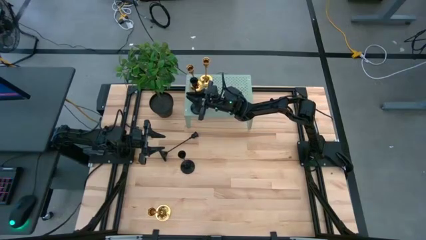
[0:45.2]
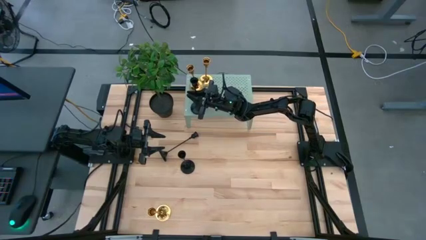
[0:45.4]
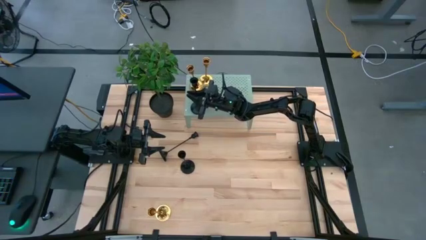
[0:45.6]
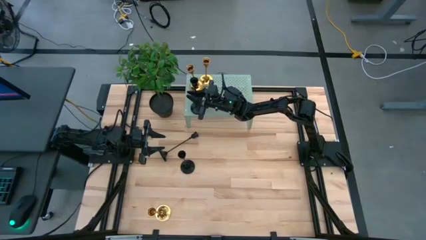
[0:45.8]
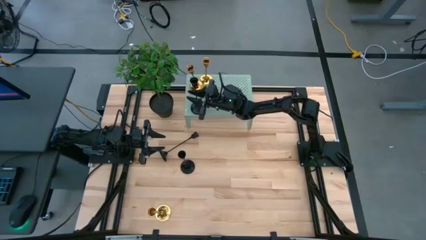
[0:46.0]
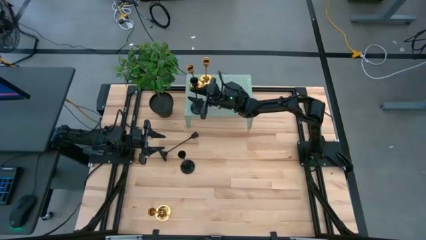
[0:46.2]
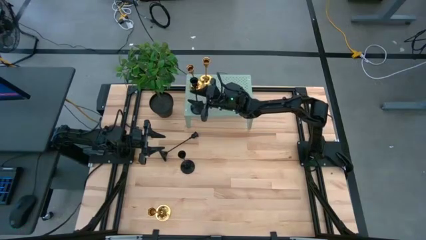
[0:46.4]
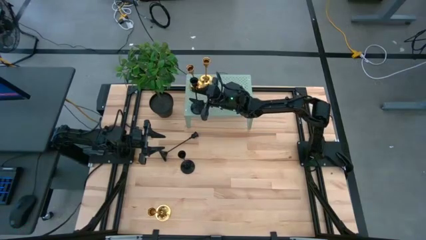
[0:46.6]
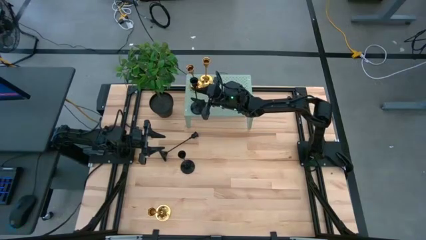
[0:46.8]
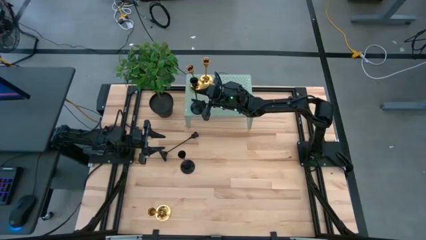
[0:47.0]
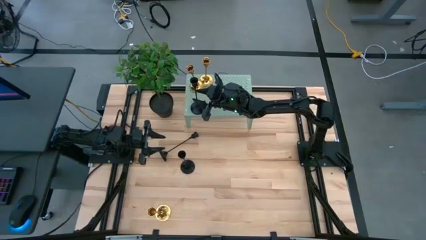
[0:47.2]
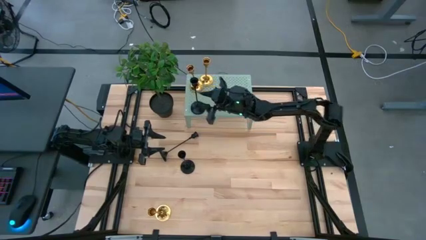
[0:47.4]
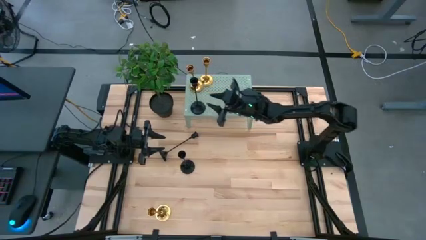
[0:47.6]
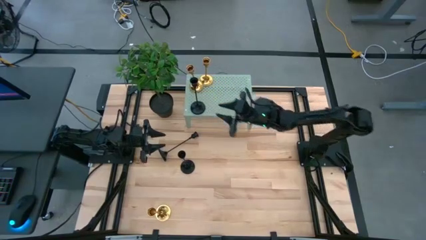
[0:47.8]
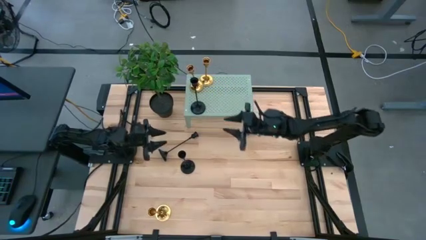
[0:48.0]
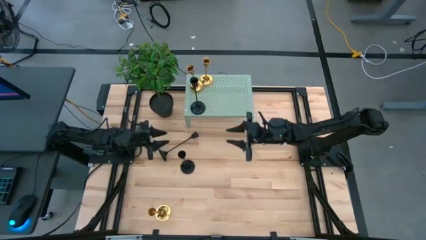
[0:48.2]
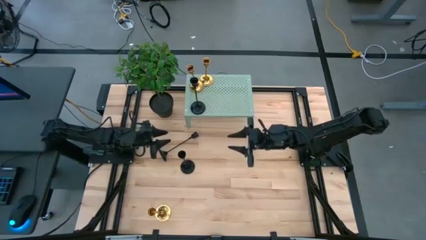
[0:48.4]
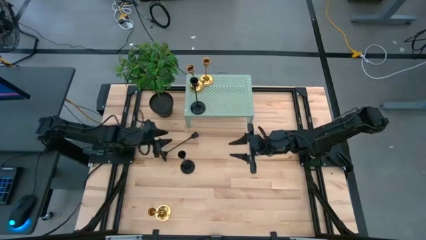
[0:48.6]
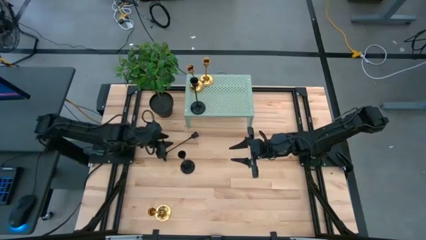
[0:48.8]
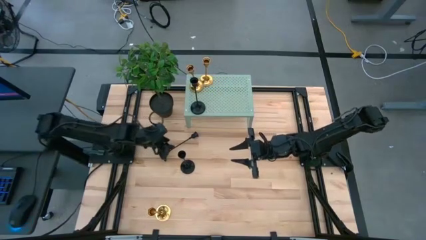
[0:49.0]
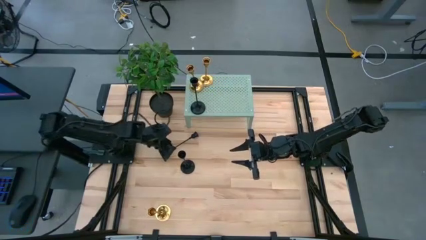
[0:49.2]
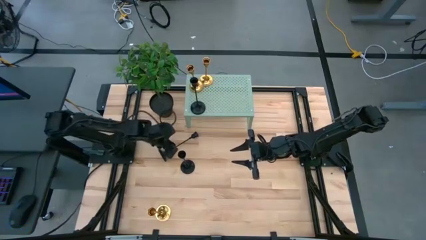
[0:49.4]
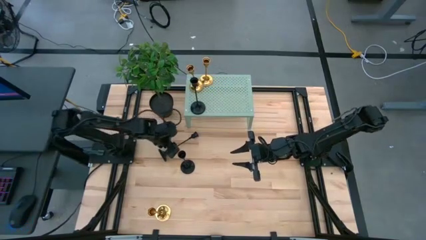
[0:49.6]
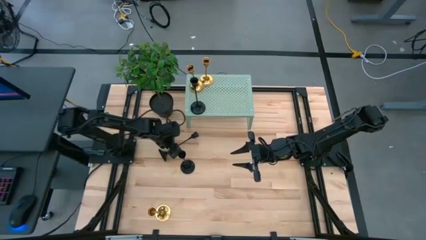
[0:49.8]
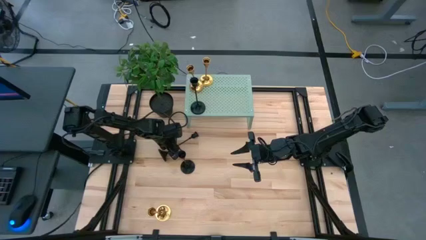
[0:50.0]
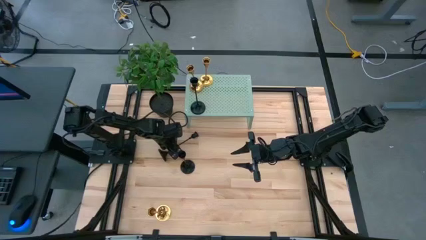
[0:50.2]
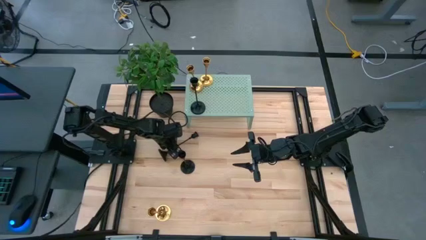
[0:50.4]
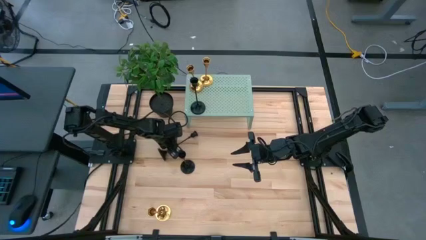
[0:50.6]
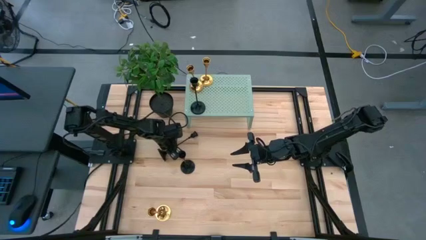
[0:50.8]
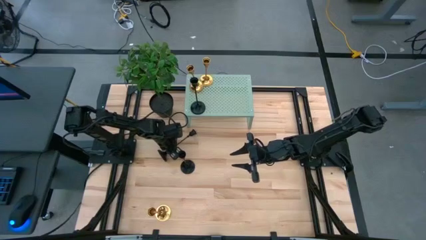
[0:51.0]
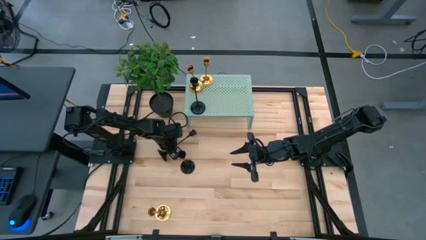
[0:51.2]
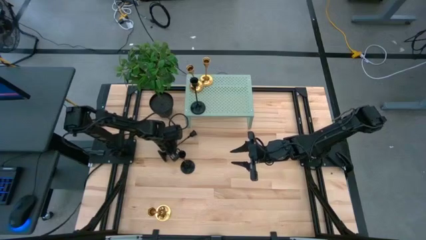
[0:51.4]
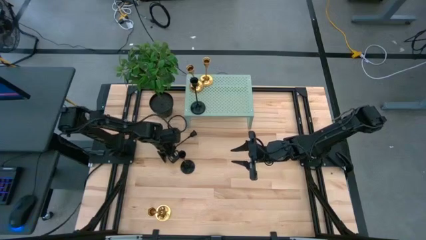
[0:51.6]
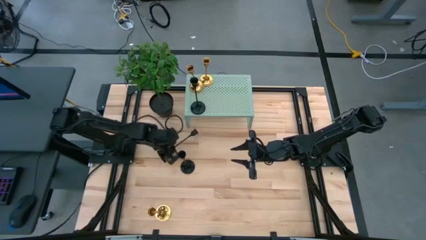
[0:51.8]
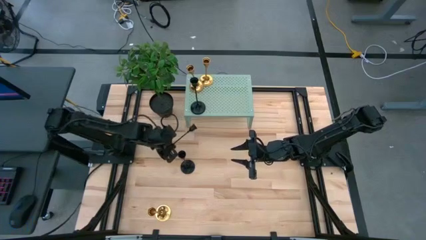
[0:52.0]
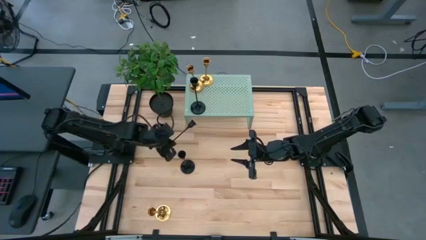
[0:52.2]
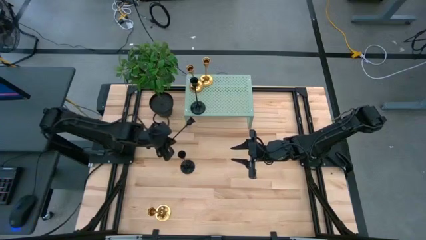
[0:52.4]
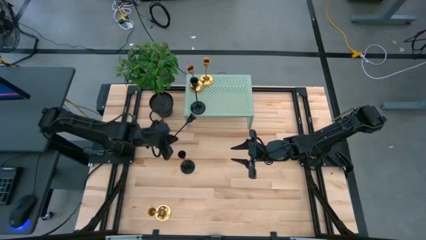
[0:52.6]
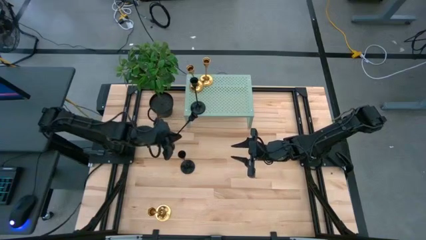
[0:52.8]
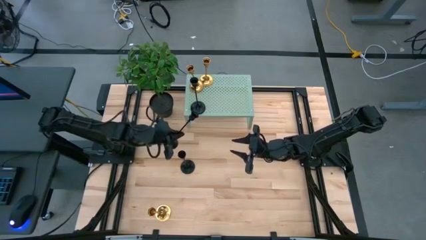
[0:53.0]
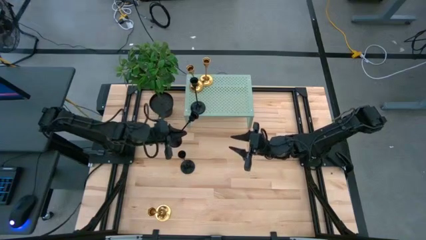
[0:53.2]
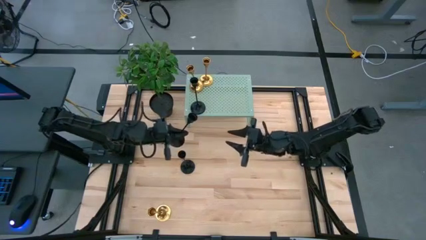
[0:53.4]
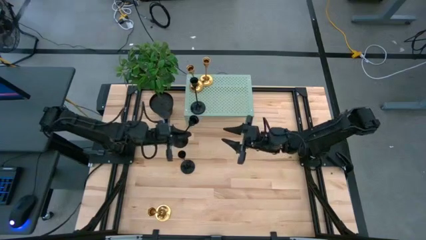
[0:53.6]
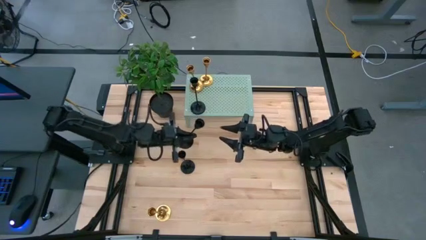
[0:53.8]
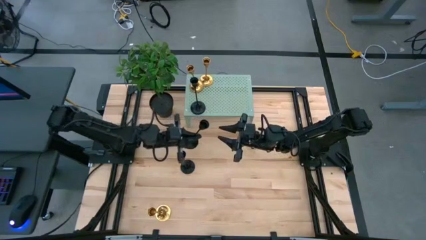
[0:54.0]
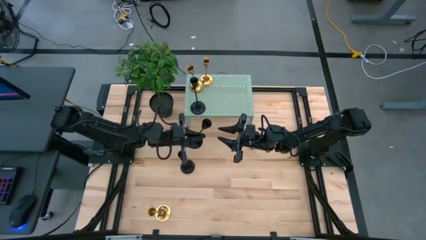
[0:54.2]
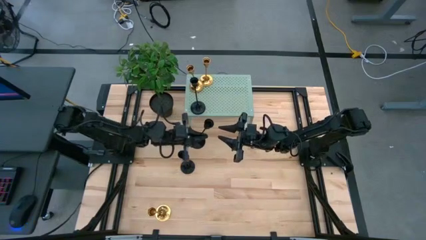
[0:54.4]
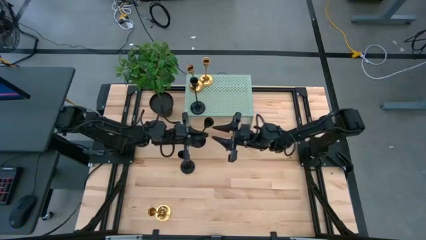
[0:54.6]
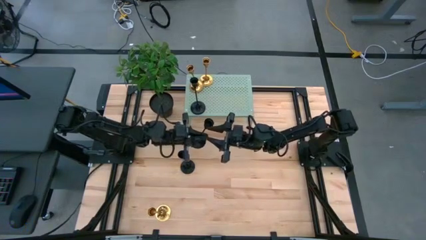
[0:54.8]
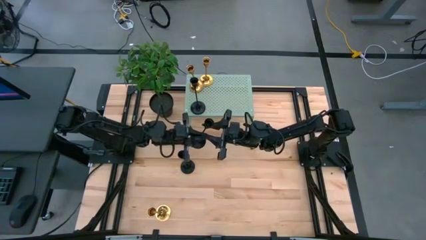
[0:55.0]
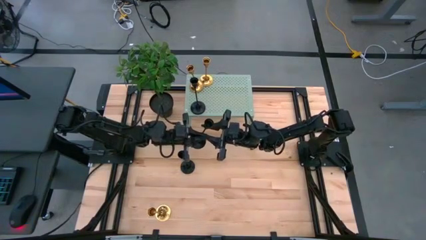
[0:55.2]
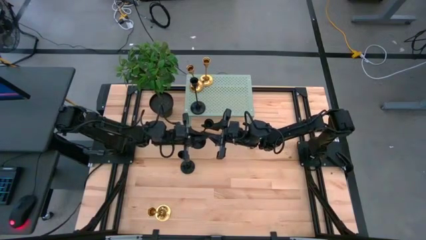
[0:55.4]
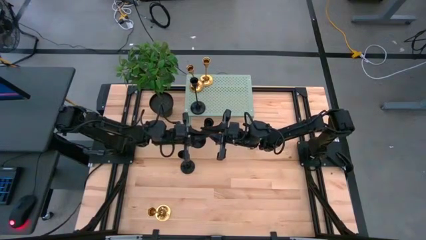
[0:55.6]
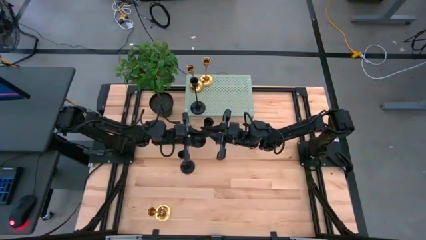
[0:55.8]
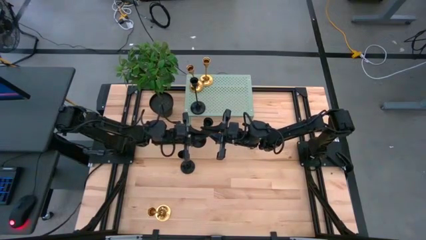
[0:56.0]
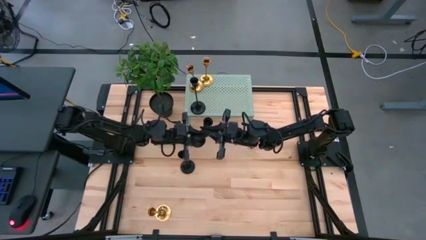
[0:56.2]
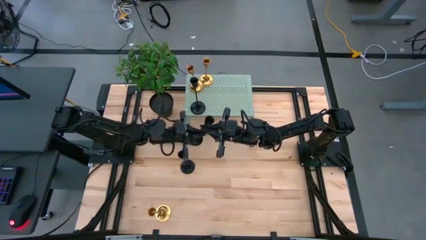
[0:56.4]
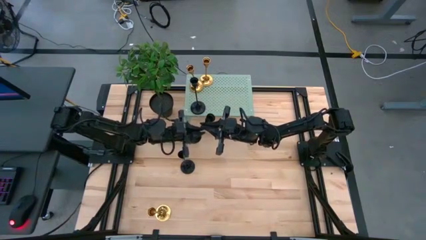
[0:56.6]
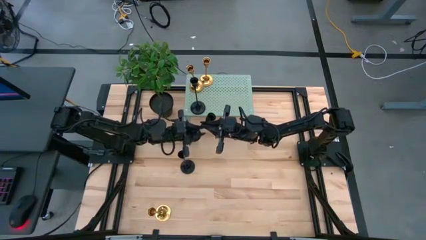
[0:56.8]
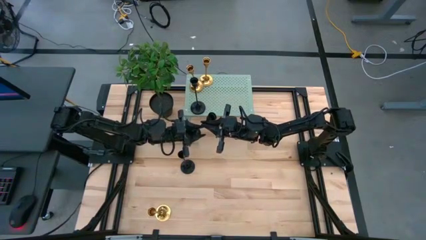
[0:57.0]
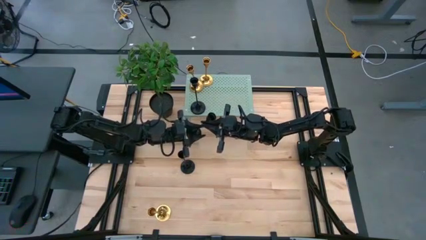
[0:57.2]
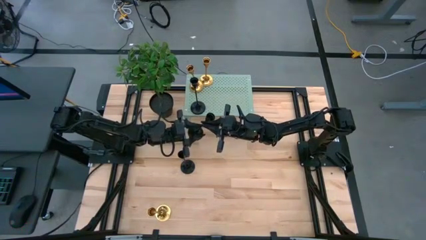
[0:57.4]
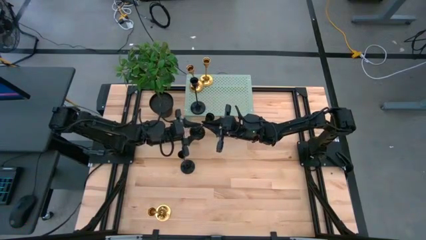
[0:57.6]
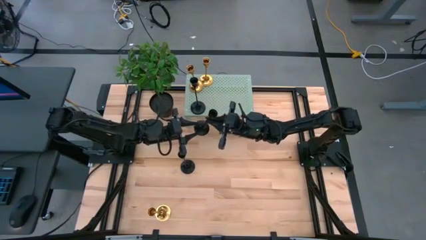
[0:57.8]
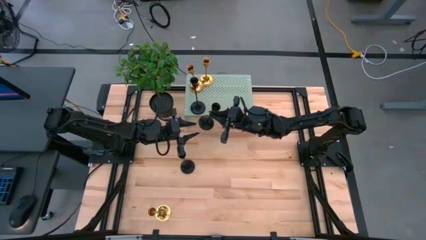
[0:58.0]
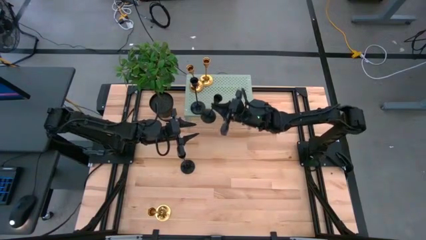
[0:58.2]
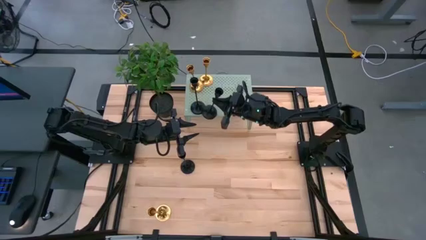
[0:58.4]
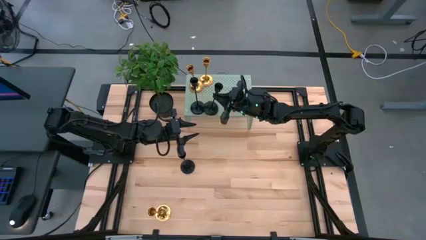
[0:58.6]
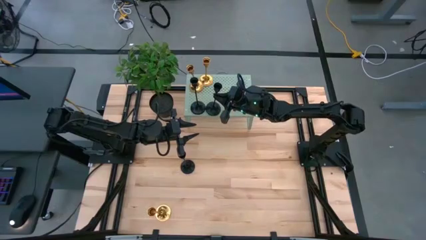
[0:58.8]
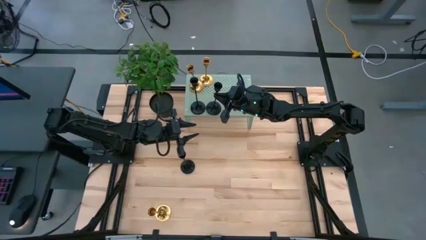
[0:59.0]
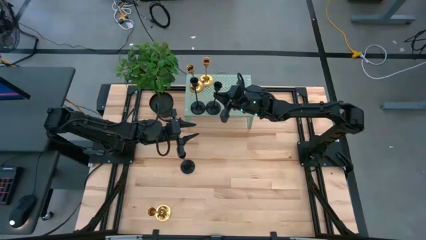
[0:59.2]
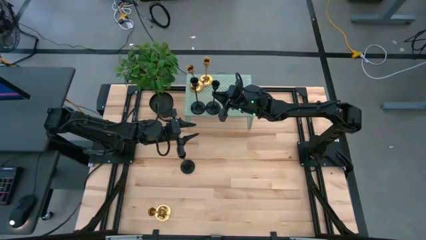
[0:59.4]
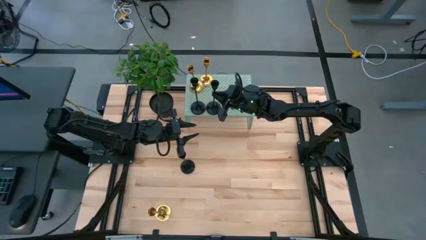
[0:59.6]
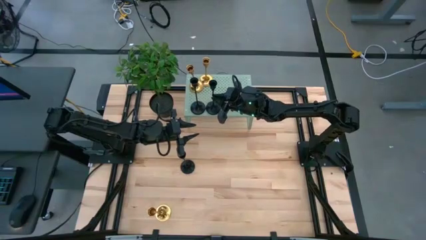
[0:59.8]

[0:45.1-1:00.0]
Task: Pick & Place candle stick holders
Put the top black candle holder on the shelf

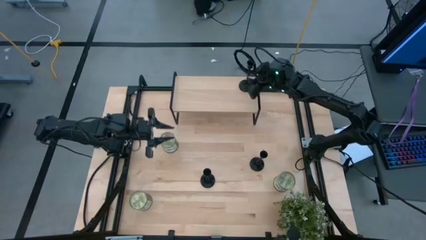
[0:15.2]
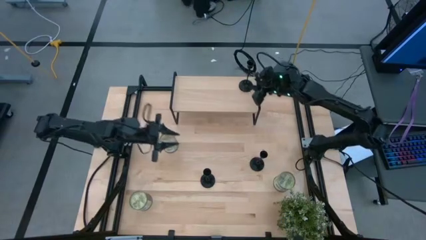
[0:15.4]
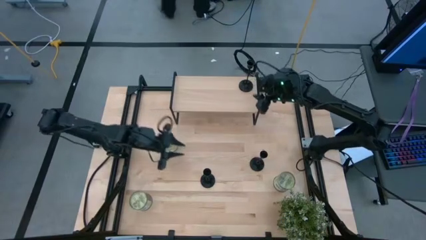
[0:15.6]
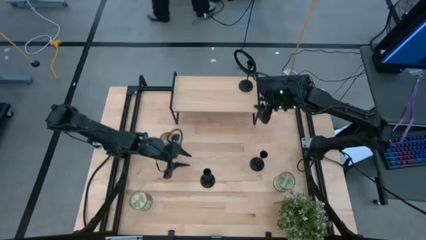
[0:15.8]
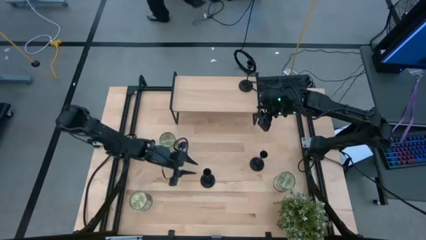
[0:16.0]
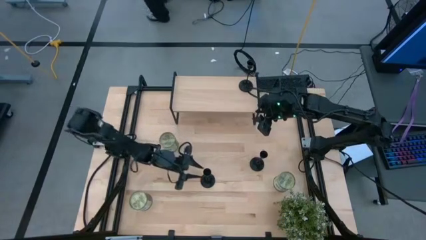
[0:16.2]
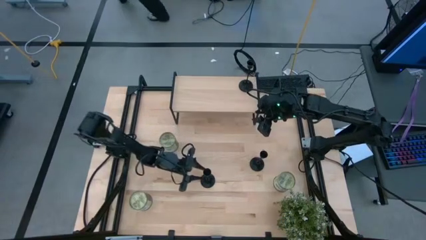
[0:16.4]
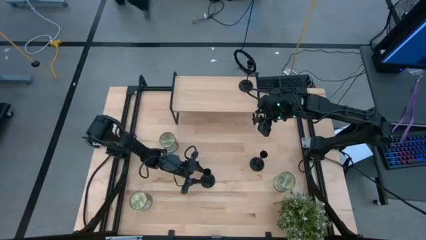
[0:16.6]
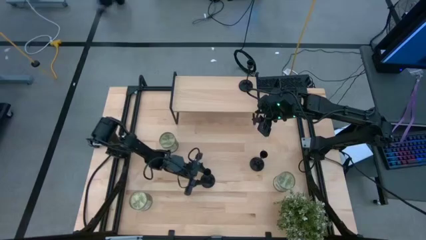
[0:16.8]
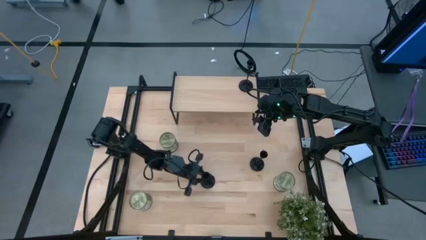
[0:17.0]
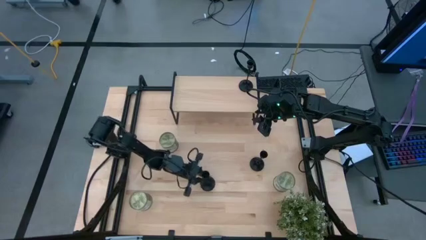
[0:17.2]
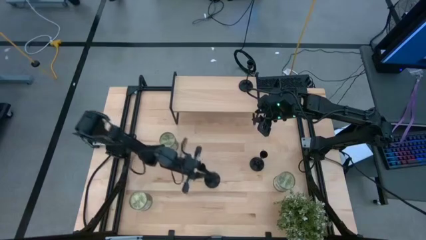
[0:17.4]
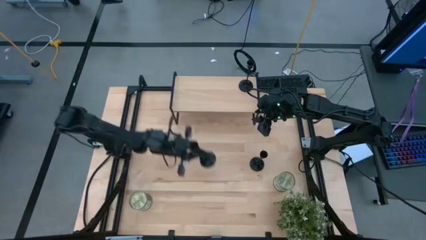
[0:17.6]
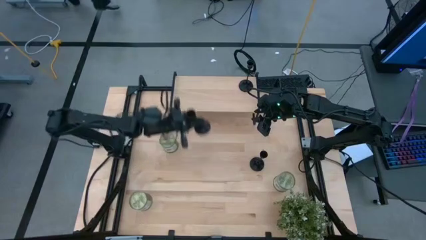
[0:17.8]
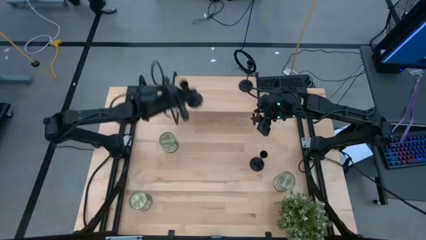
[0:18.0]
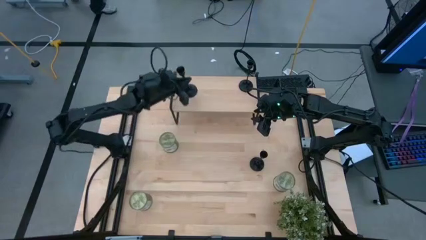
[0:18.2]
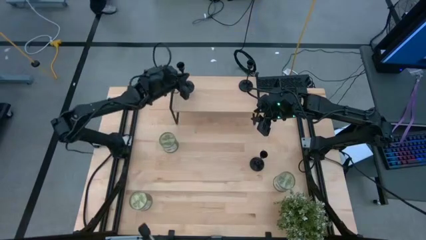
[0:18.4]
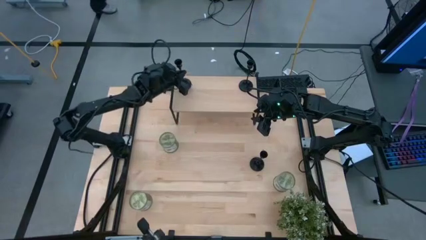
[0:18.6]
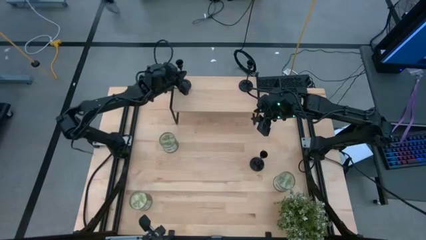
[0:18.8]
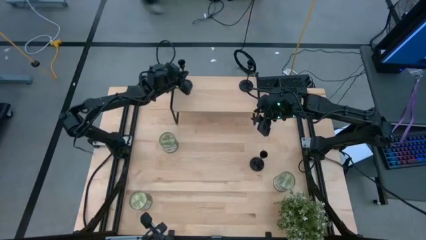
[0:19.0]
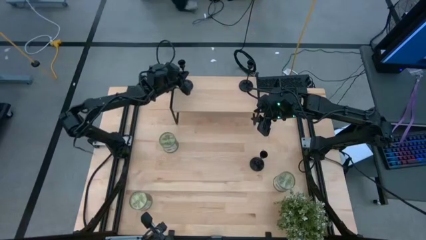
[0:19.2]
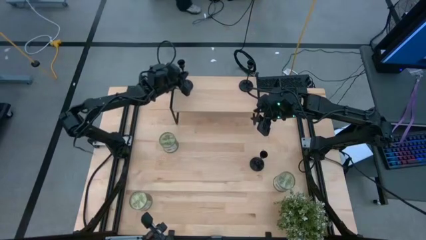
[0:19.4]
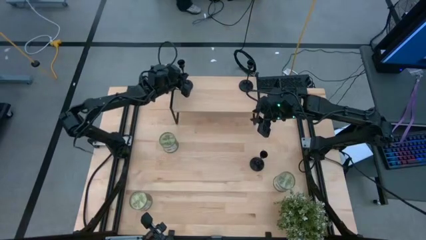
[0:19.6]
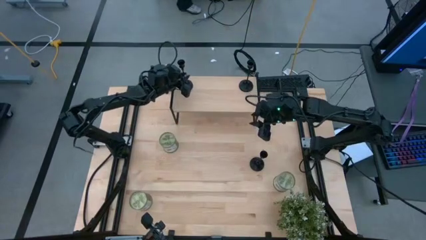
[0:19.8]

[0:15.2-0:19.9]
Task: Pick & Place candle stick holders
Put the left black candle holder on the shelf
